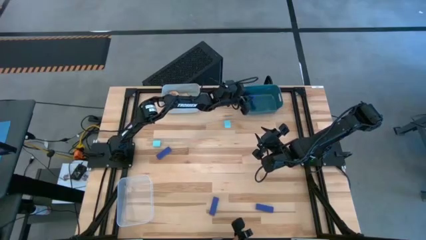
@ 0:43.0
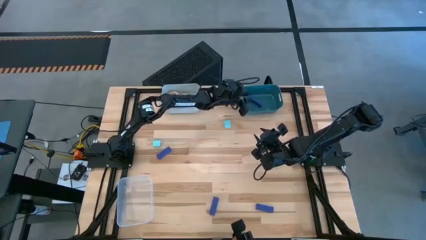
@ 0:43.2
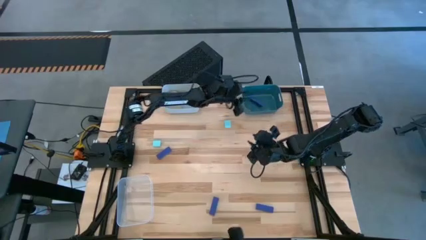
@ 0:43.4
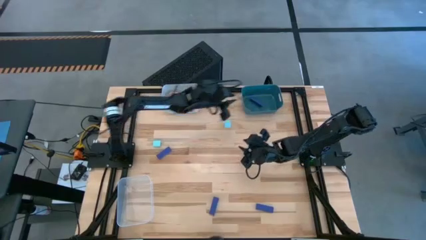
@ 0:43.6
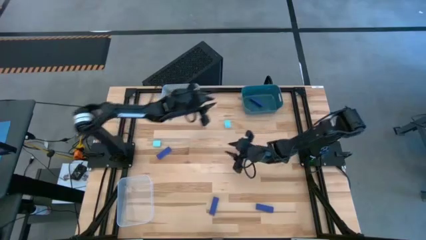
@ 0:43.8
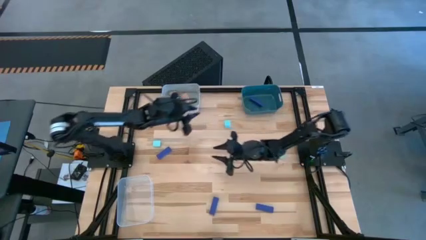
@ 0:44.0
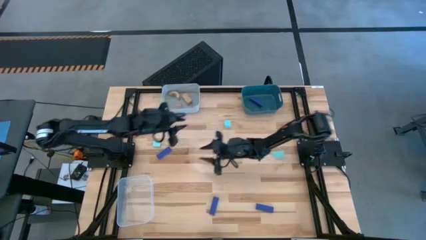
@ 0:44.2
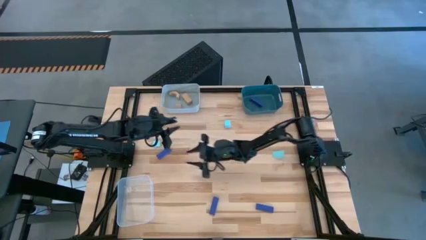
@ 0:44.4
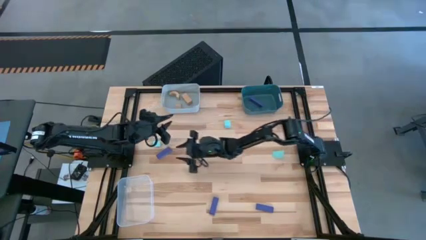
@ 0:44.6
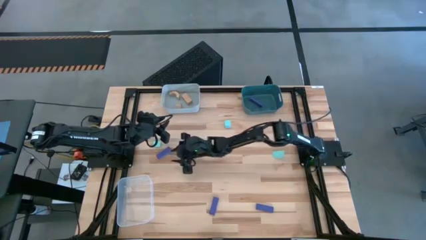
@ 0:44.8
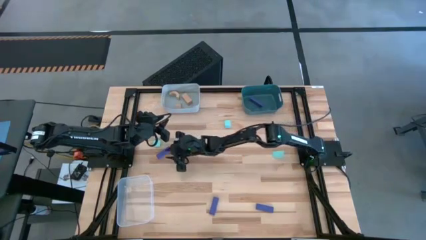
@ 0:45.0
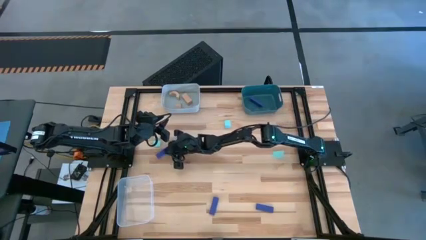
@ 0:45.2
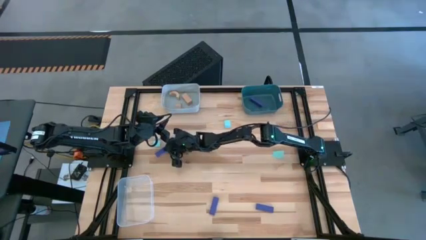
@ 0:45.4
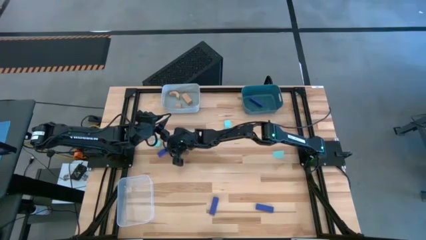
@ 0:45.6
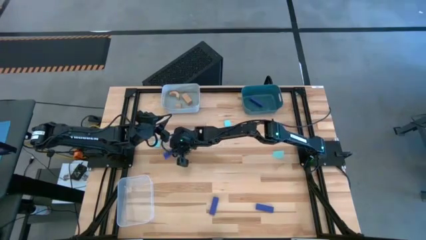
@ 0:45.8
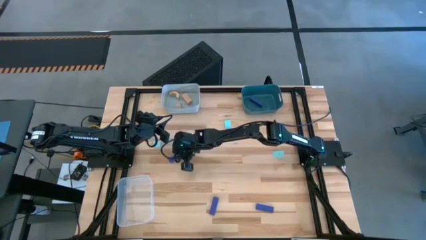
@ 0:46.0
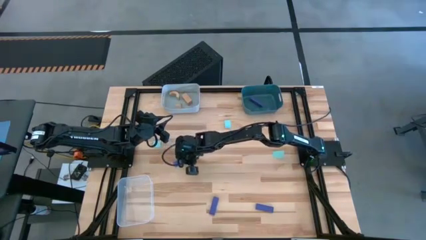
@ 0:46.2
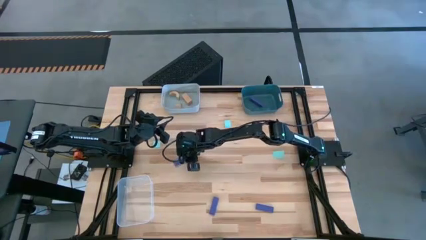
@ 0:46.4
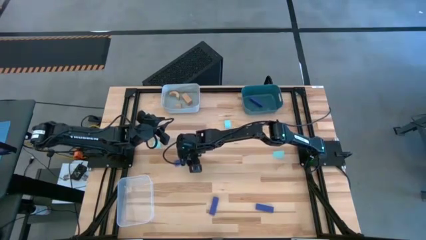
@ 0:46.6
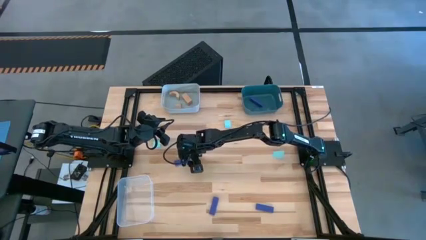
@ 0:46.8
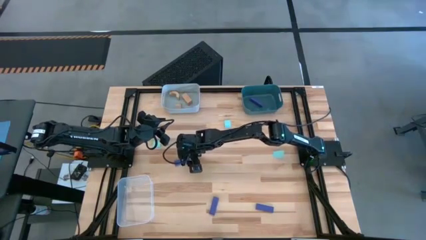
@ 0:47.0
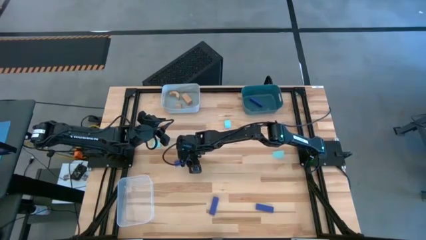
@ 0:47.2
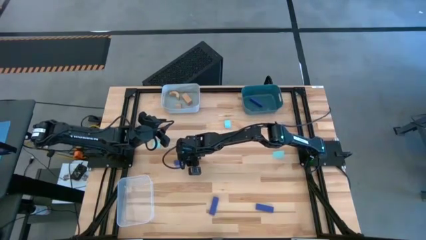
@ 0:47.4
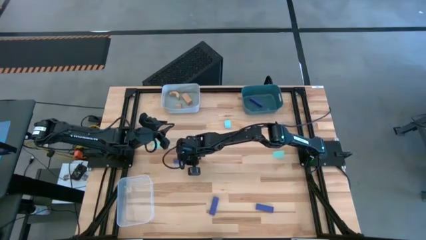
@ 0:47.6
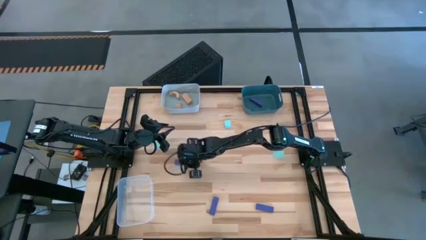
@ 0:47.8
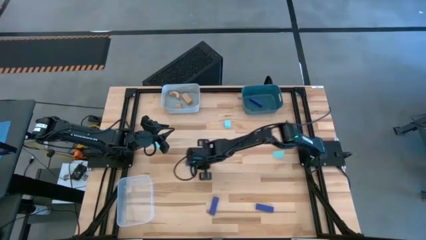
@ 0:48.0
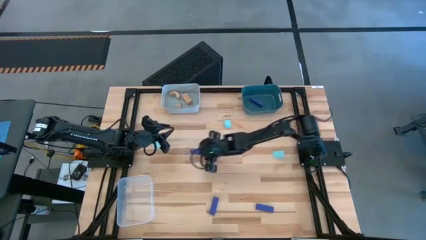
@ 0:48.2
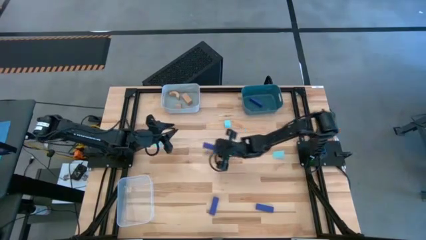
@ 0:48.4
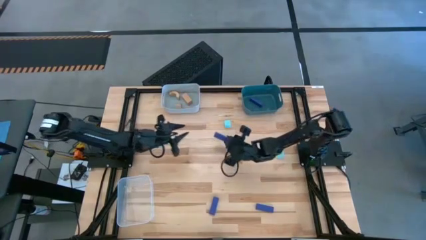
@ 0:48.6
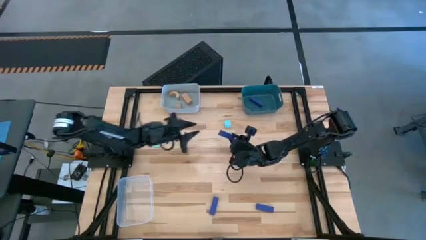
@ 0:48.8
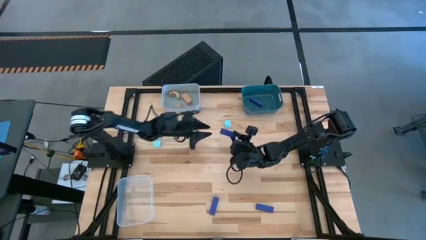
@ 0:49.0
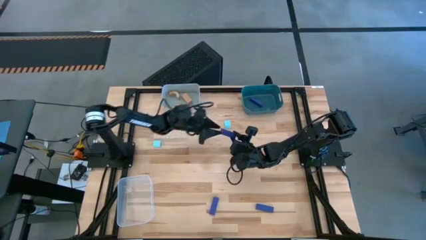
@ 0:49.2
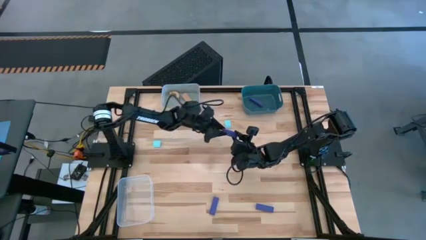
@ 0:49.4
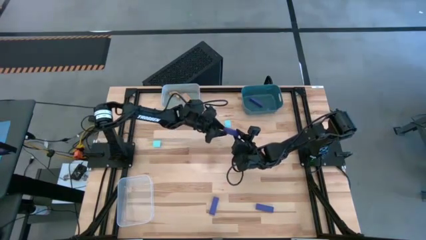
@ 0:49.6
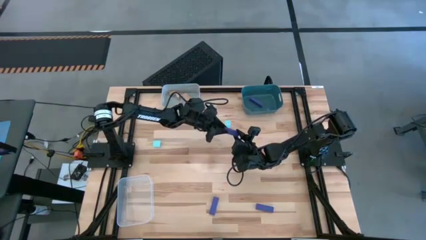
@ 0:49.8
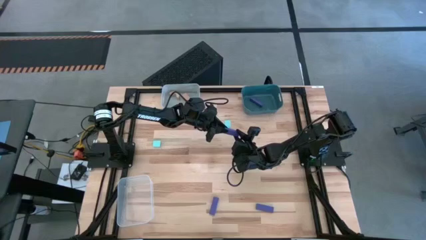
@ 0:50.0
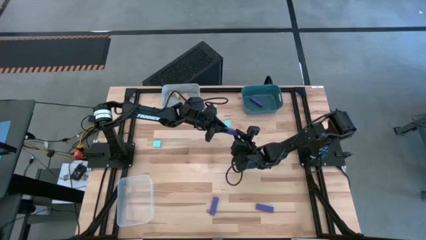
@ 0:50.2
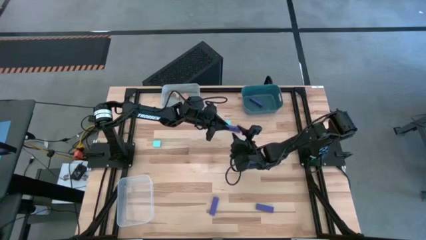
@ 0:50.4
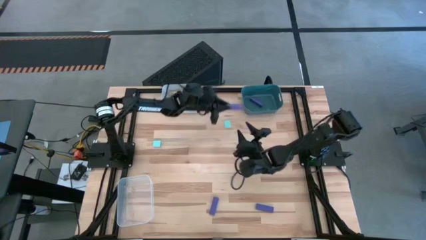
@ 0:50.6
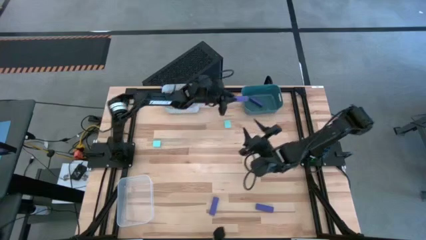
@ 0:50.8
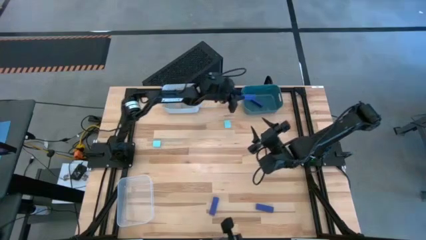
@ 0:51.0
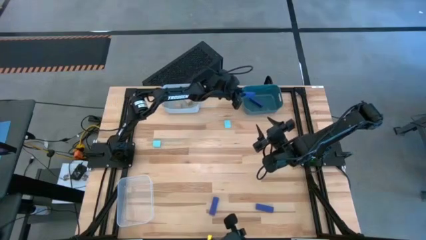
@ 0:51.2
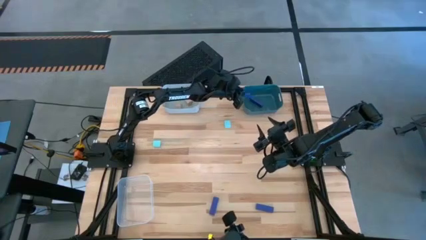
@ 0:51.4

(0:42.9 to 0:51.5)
Task: Sort & place blocks by color
Put the violet block into the blue bin

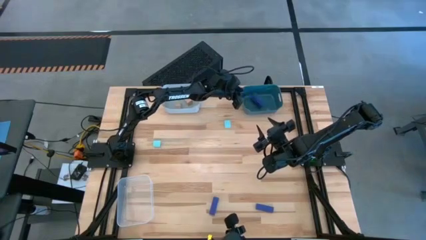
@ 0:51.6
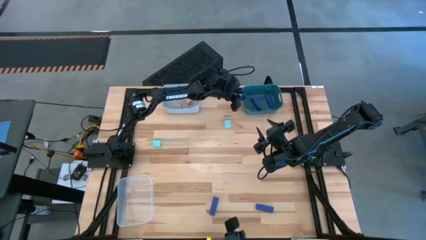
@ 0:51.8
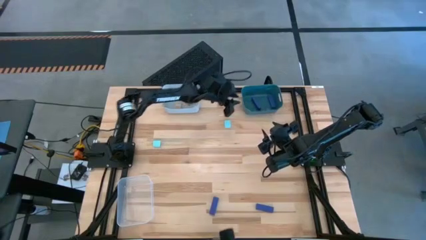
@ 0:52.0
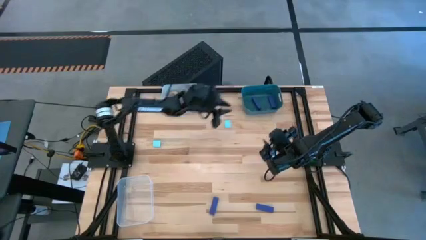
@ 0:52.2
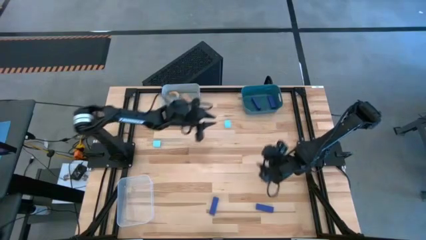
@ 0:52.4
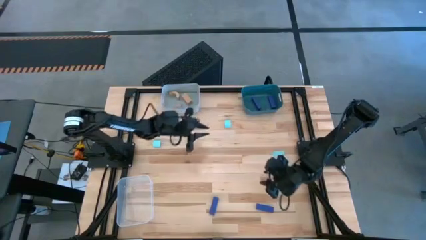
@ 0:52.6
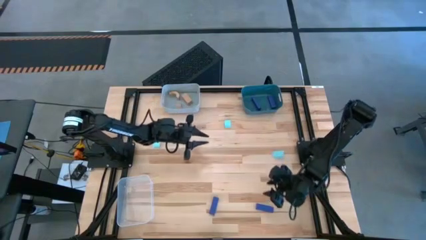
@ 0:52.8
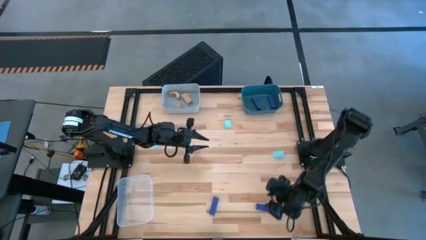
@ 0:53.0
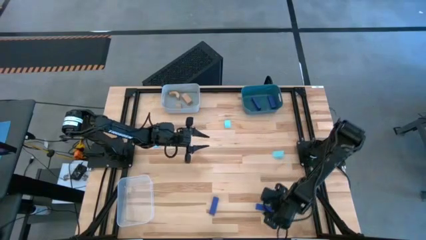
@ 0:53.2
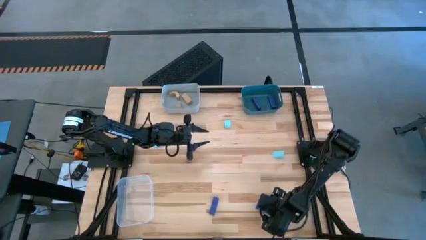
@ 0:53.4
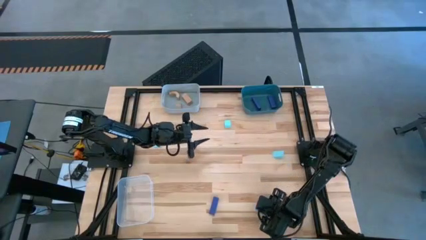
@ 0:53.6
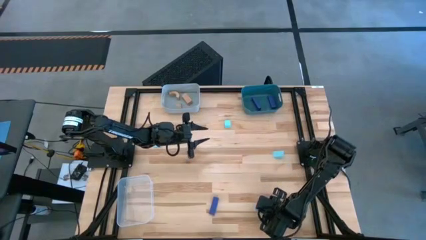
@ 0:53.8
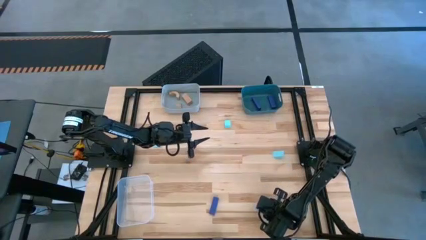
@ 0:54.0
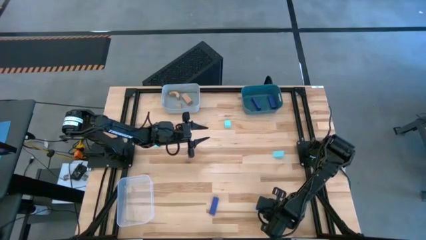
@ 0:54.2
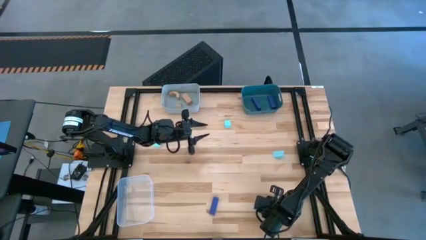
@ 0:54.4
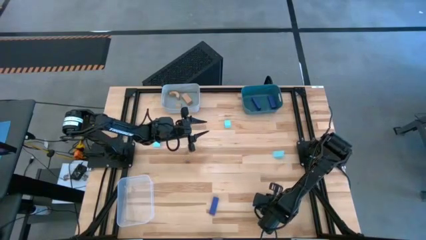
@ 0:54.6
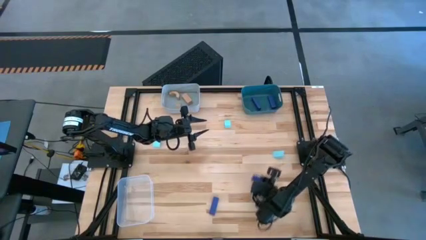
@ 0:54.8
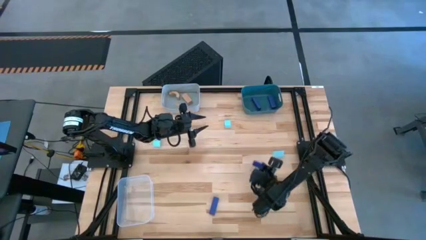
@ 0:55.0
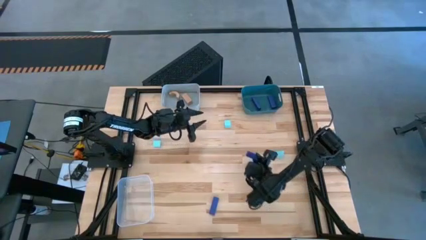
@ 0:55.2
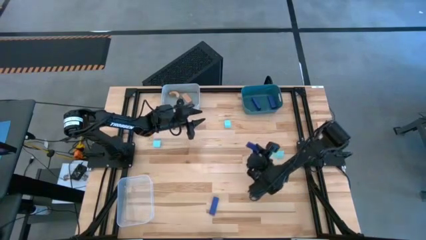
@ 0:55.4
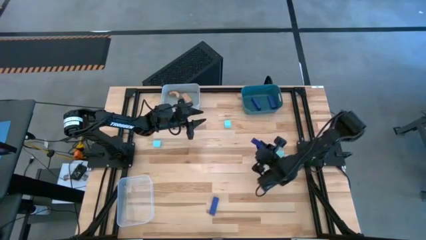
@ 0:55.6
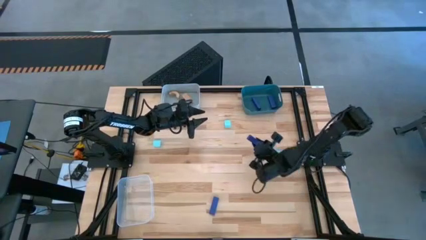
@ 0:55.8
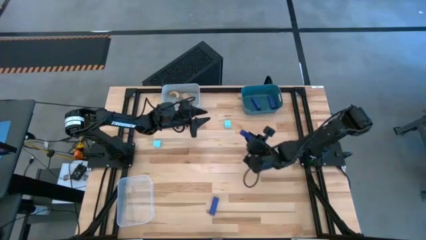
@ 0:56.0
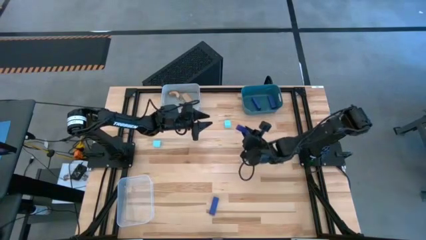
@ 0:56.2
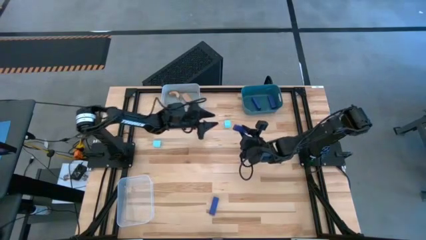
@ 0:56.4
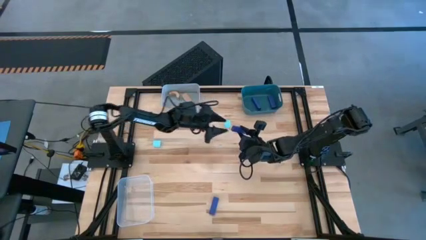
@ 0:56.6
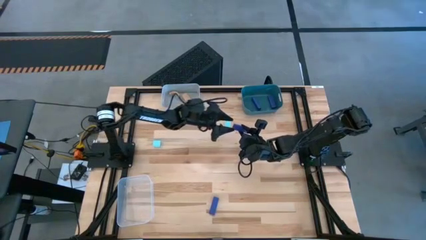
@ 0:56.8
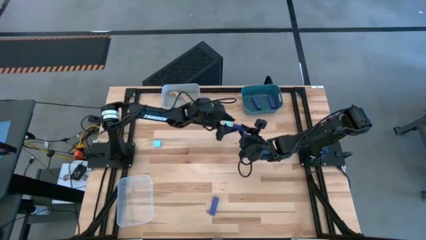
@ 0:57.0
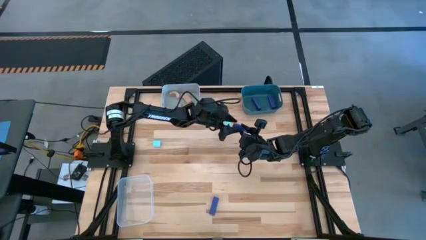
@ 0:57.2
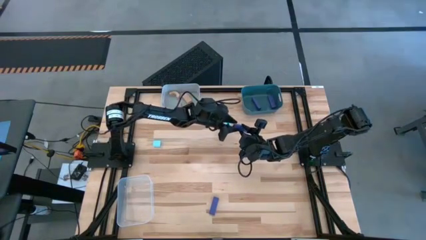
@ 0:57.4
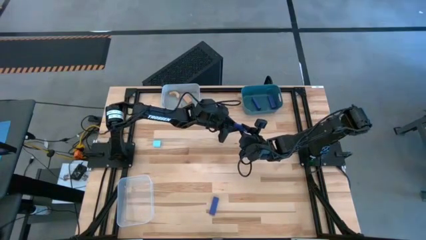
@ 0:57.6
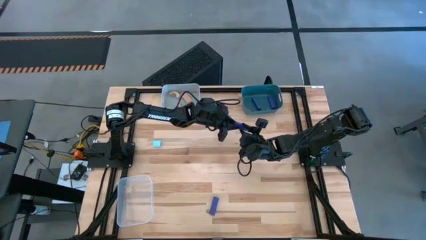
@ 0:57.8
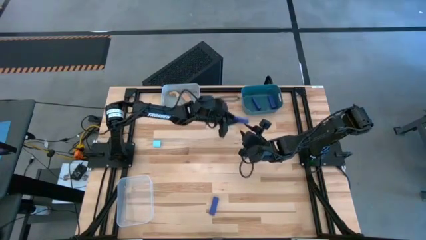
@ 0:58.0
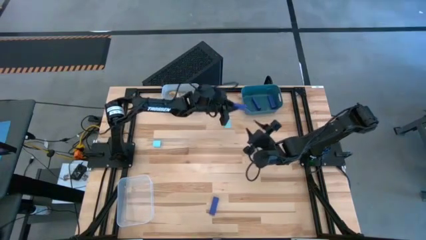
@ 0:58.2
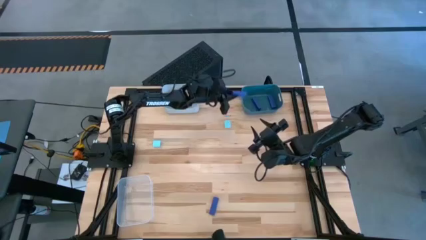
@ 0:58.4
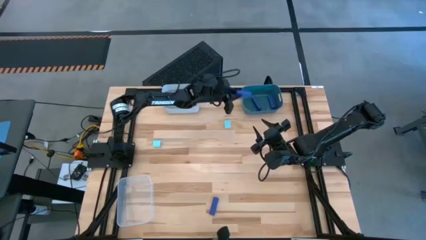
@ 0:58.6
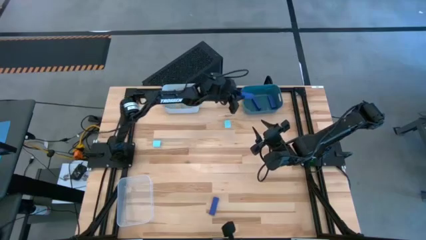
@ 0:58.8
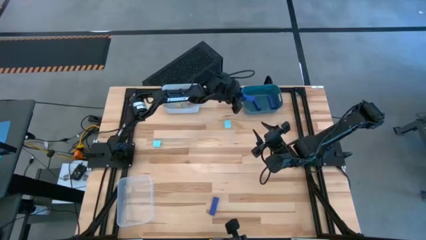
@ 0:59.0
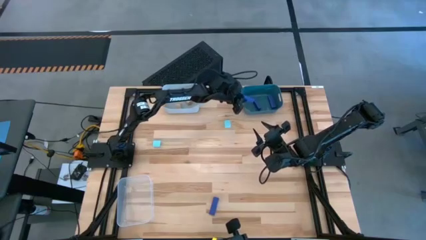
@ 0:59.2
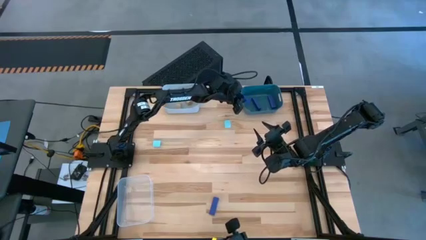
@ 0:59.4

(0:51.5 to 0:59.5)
Put the violet block into the blue bin
